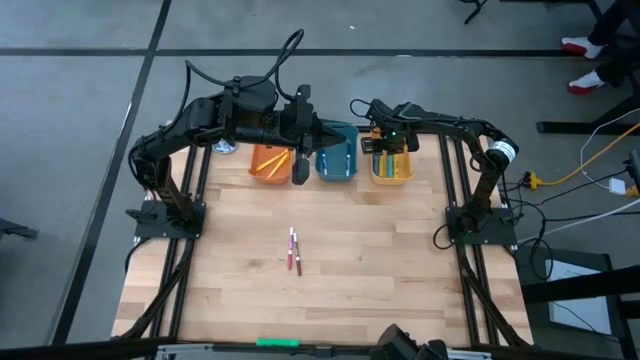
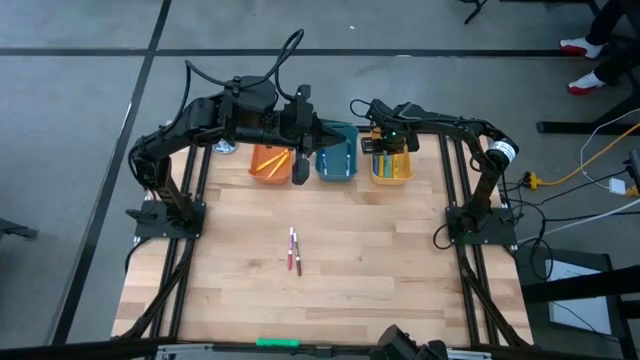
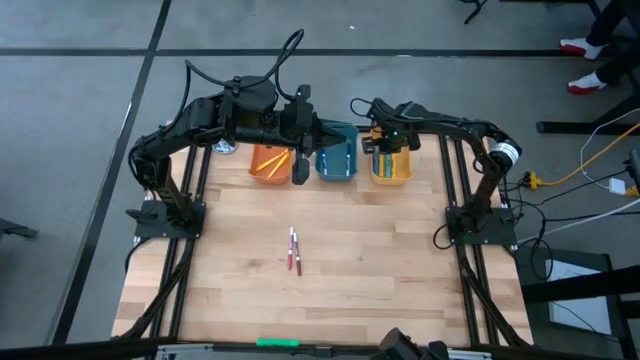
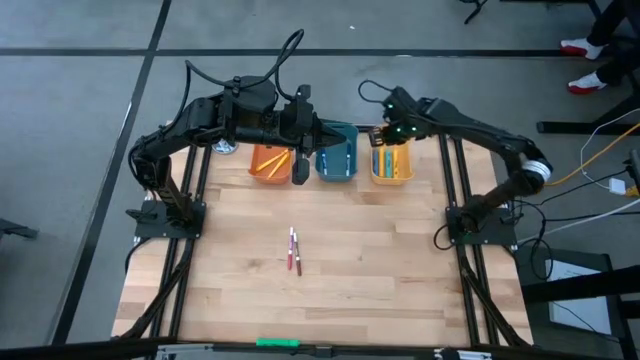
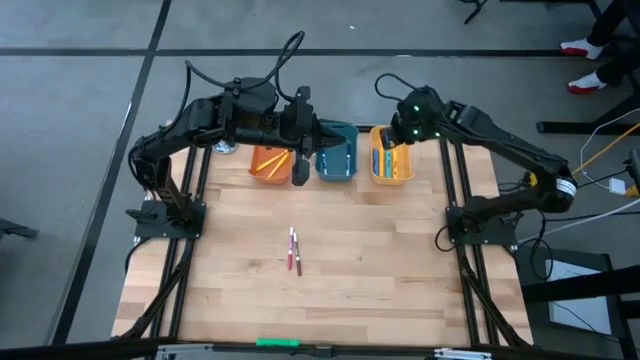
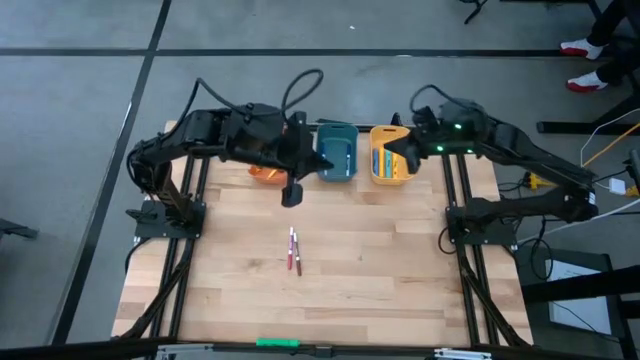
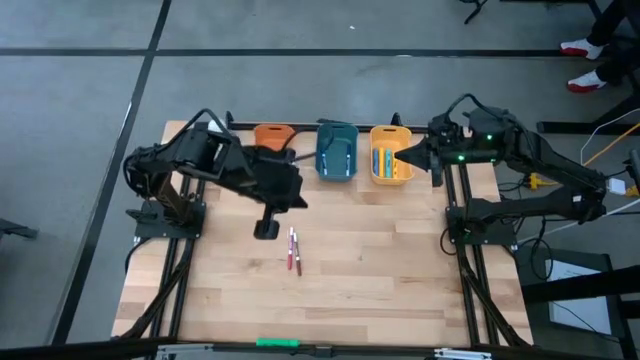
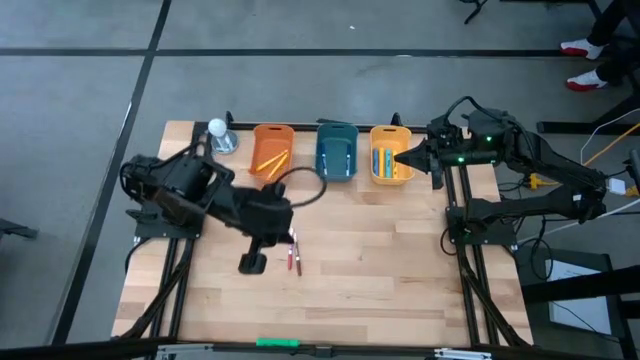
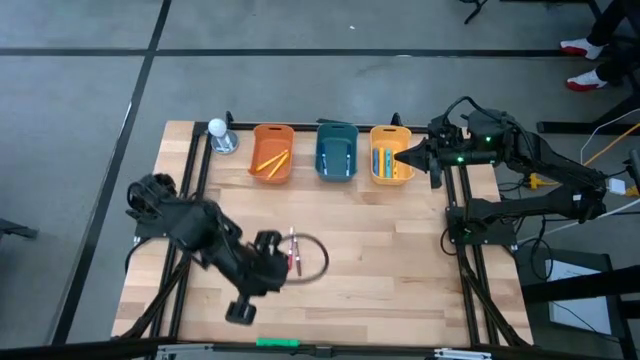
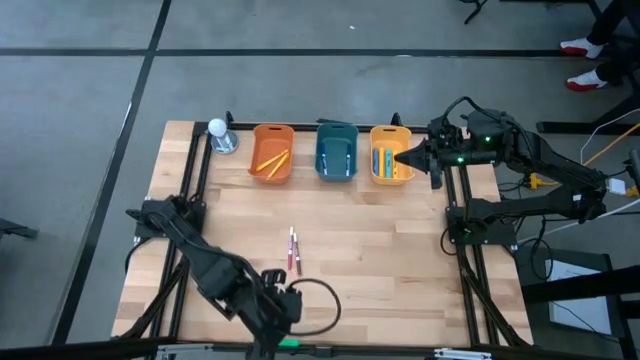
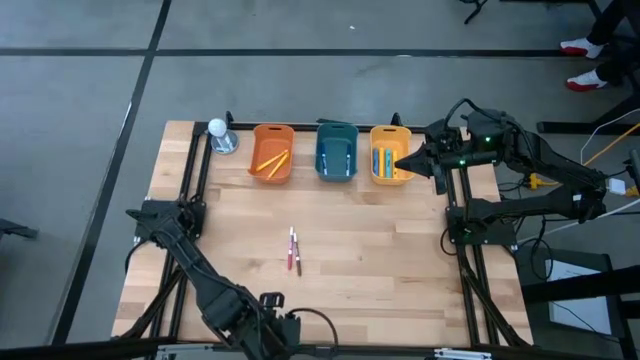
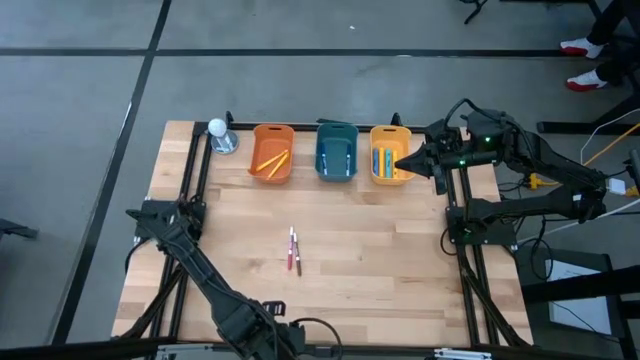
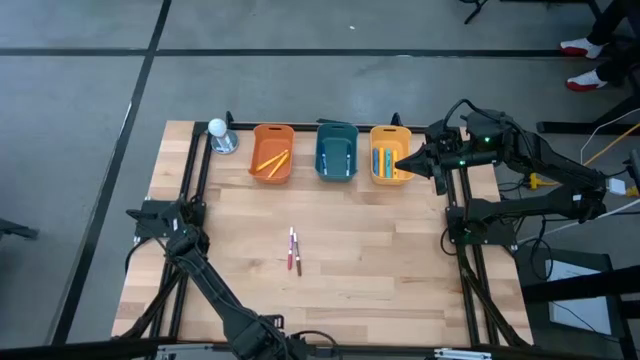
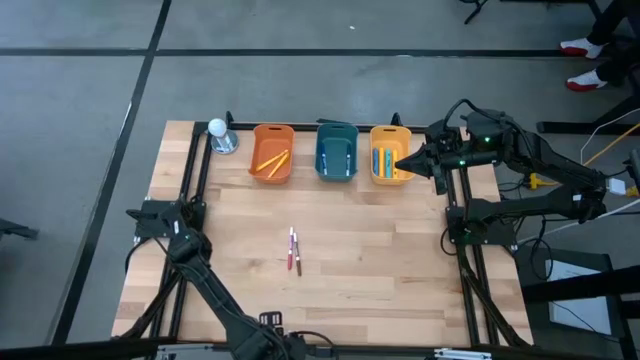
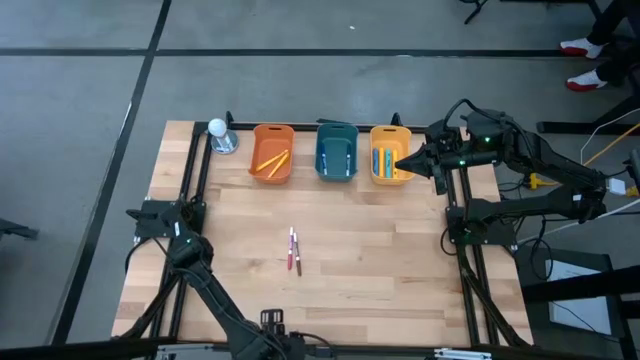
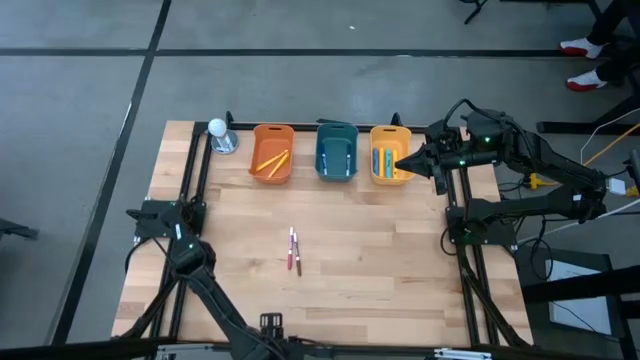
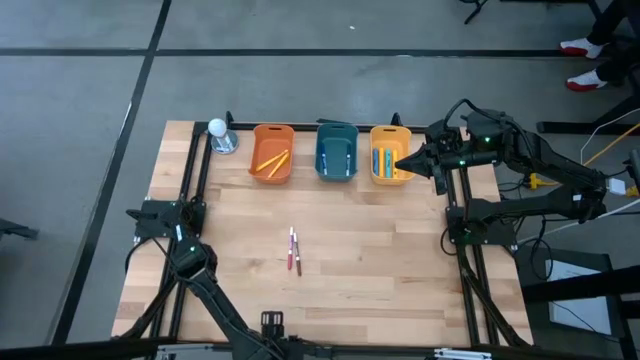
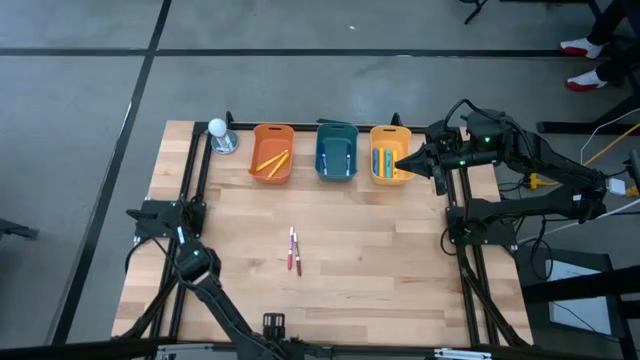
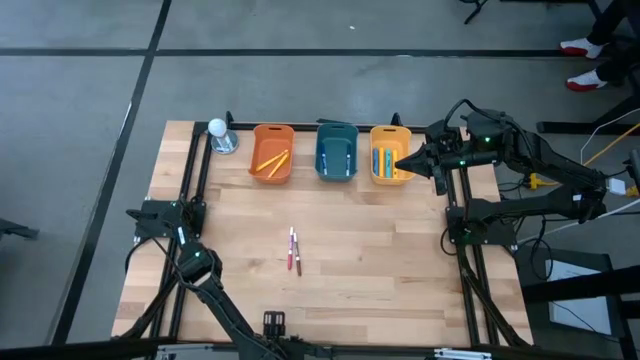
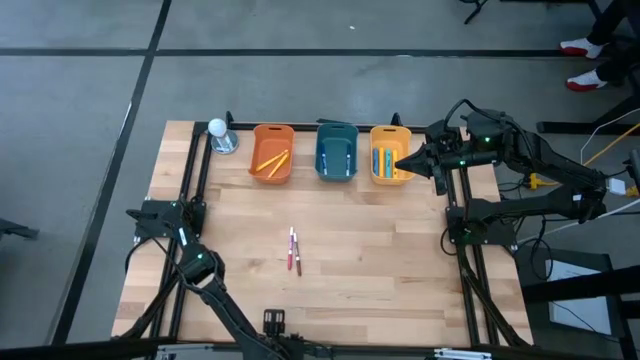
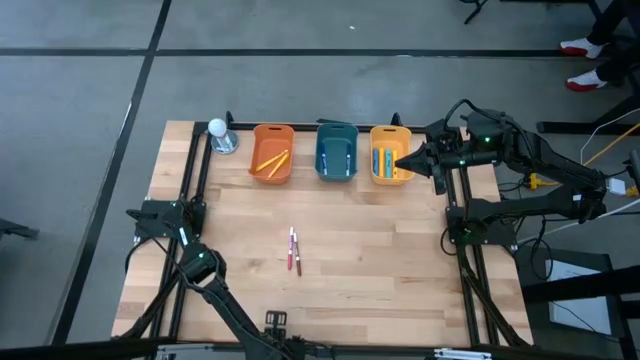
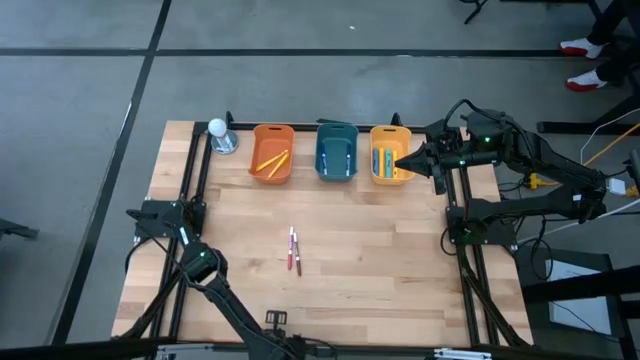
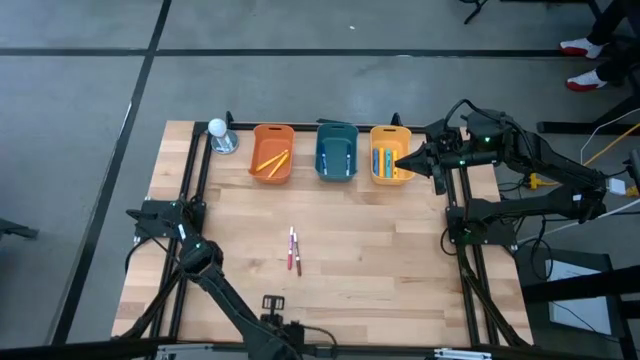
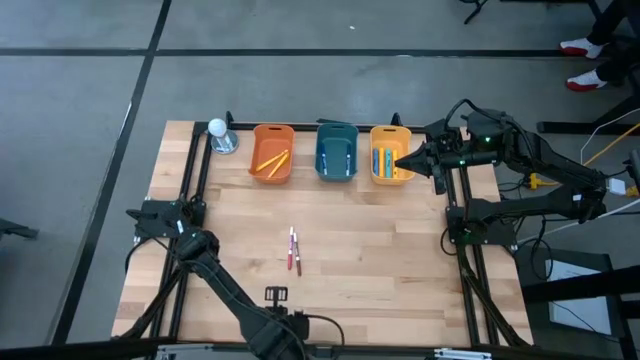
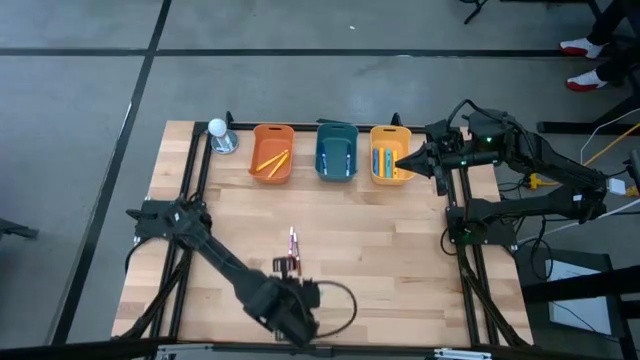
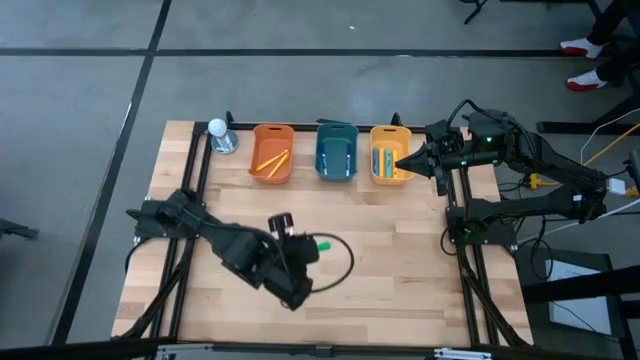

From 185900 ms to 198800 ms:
Task: Pick & Place Markers
Put the green highlighter pen into the yellow bin

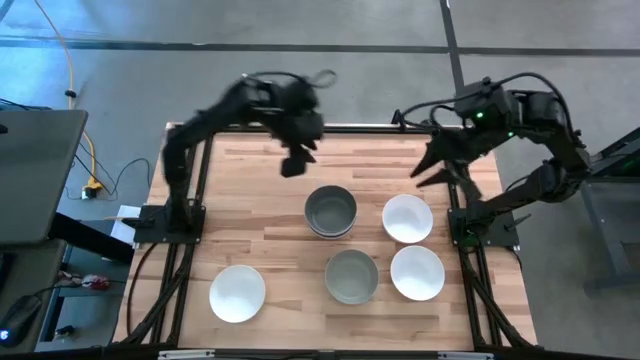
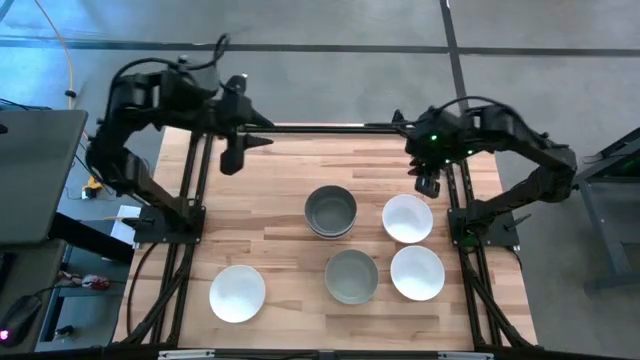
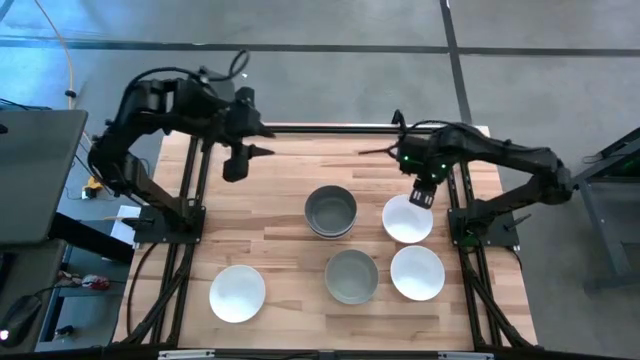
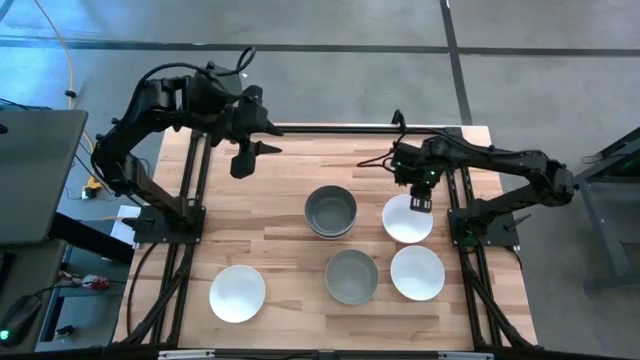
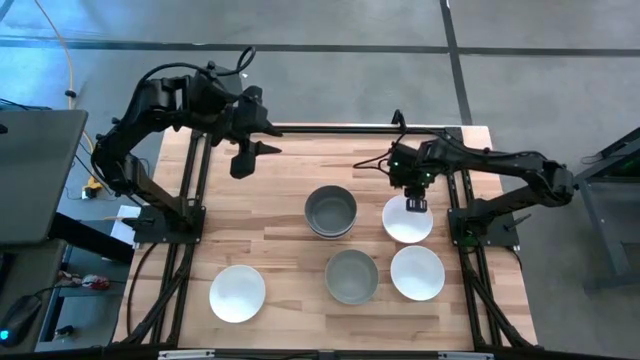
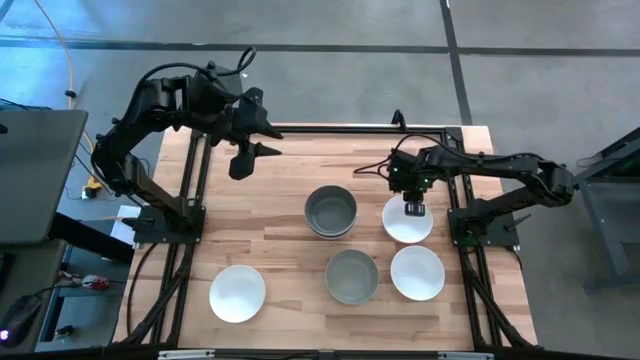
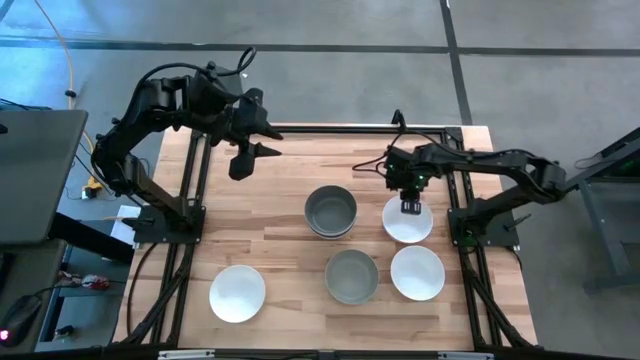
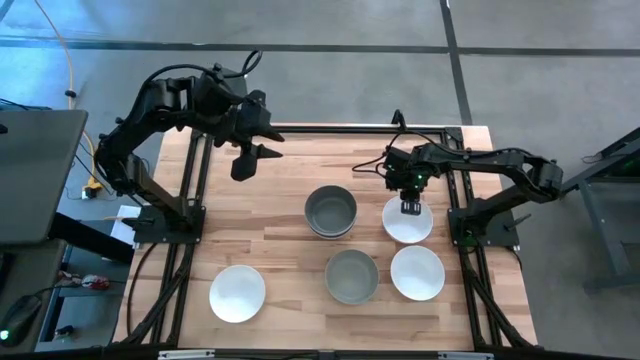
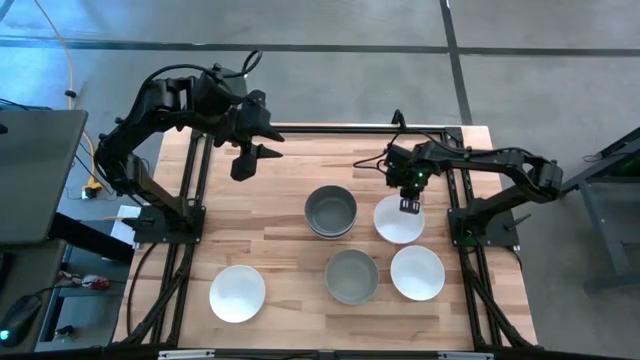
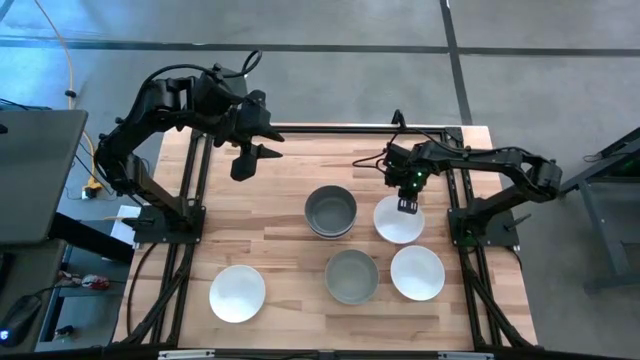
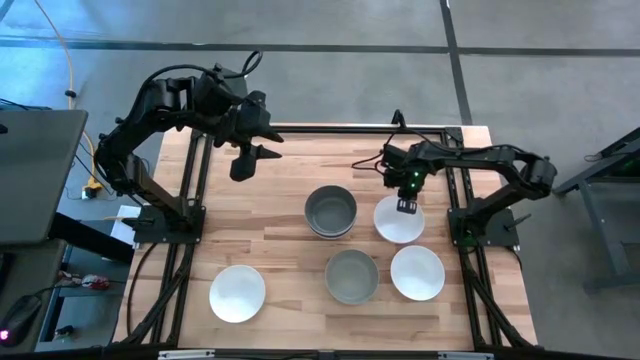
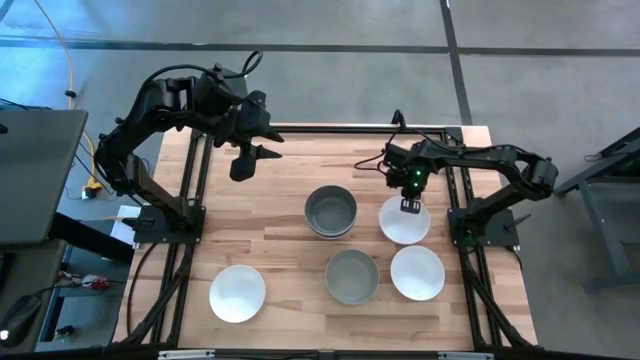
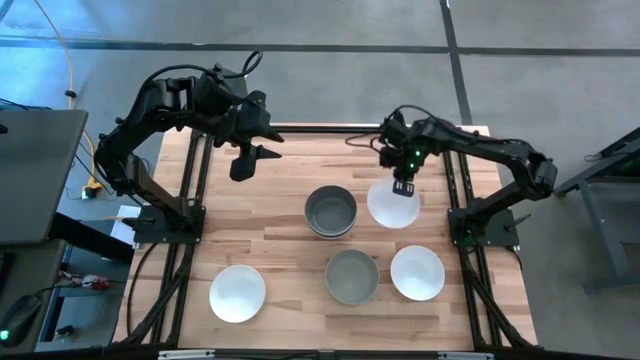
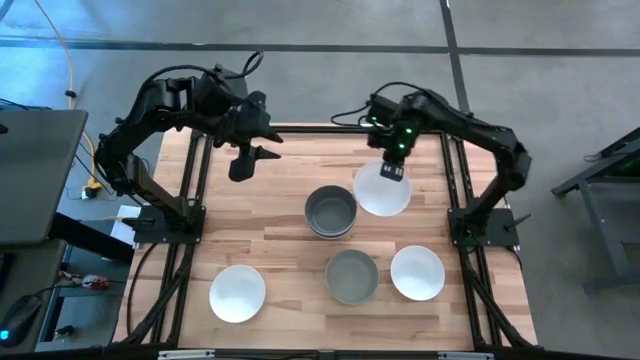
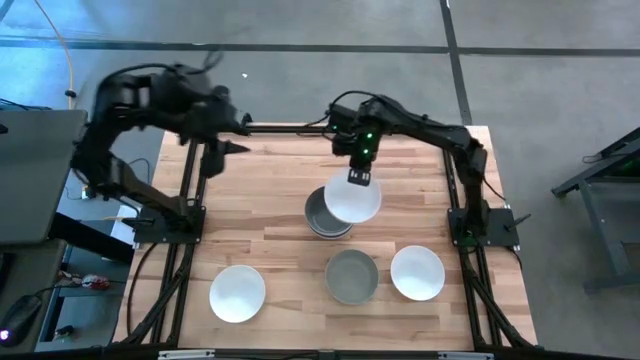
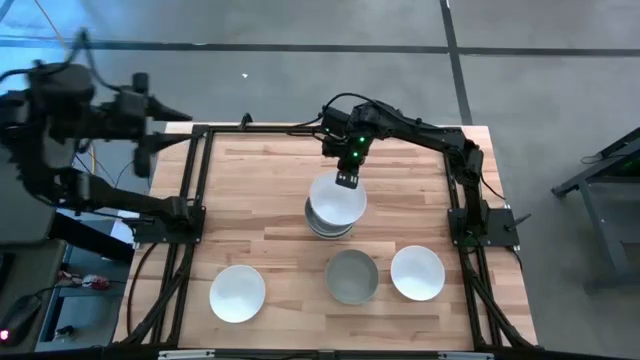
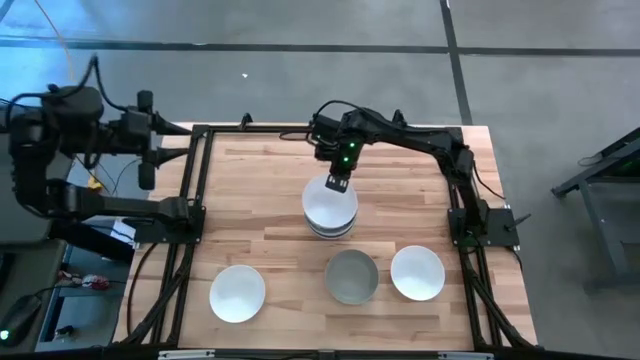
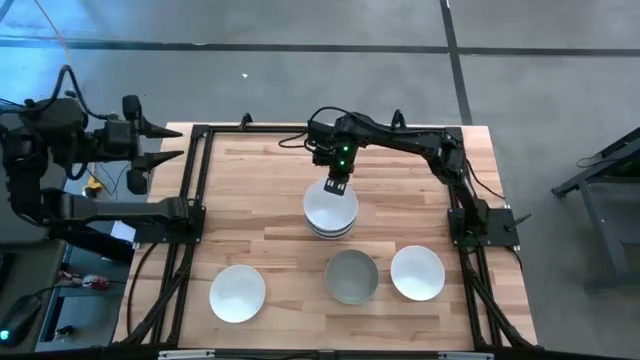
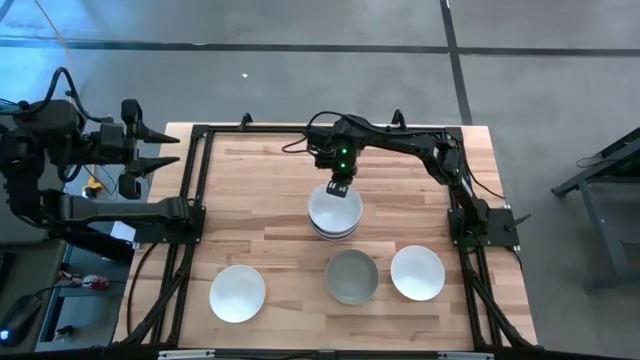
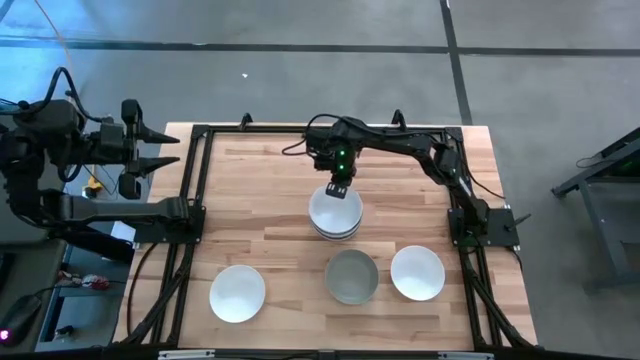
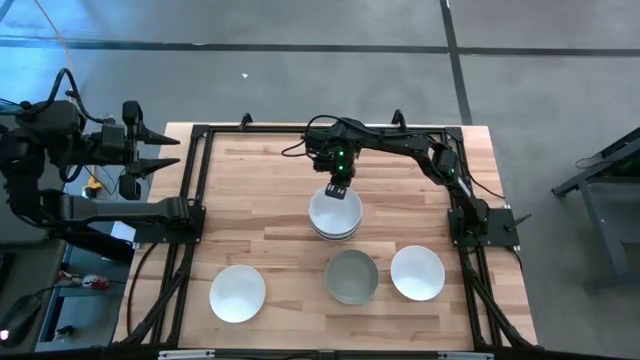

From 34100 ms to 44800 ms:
Task: Nest bowls inside each other
Stack the top white bowl on top of the top gray bowl
